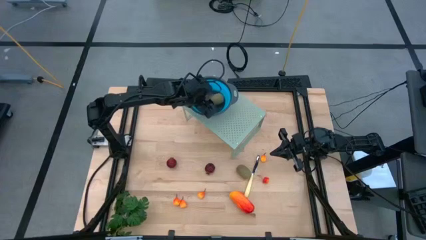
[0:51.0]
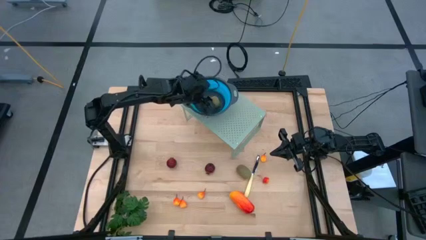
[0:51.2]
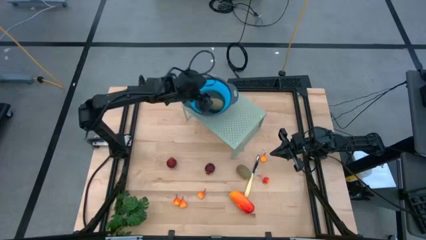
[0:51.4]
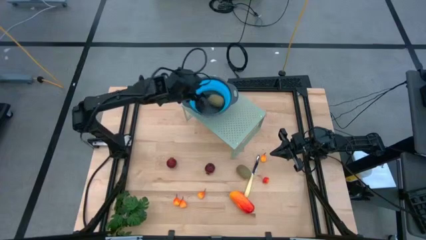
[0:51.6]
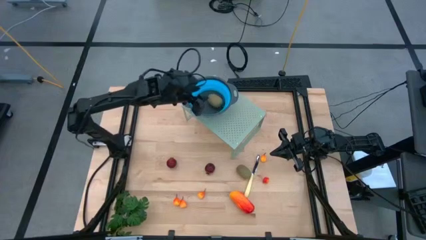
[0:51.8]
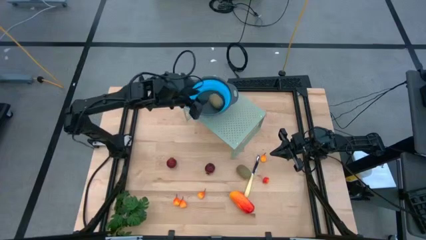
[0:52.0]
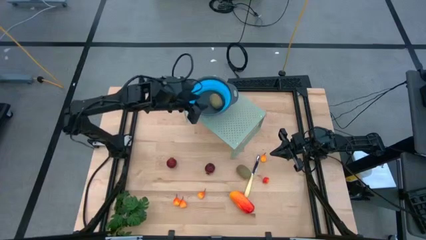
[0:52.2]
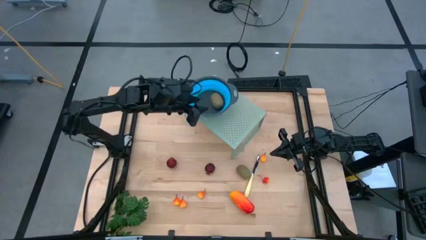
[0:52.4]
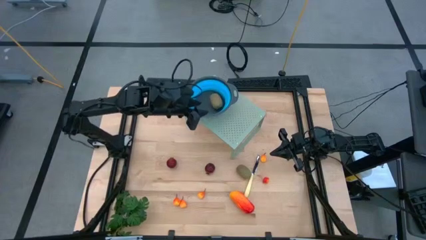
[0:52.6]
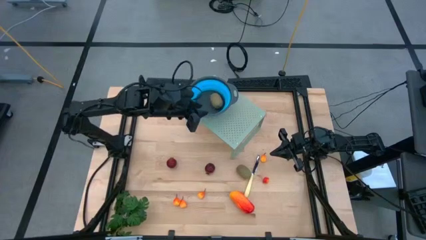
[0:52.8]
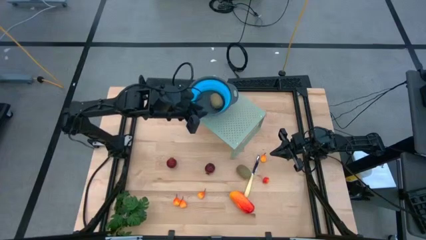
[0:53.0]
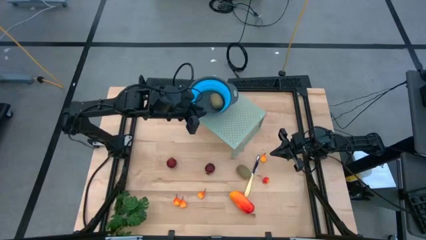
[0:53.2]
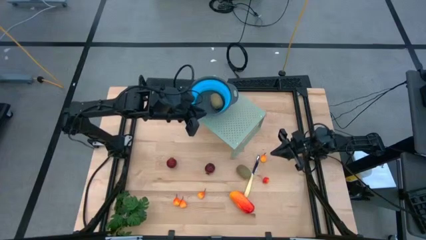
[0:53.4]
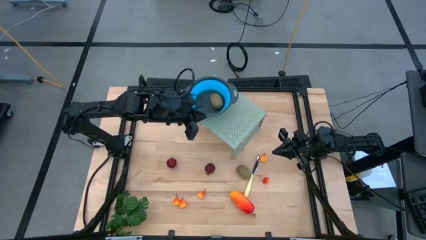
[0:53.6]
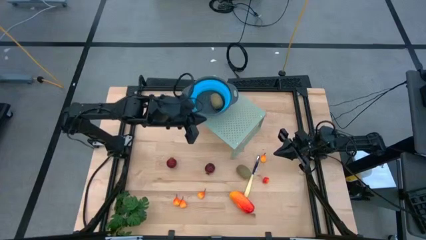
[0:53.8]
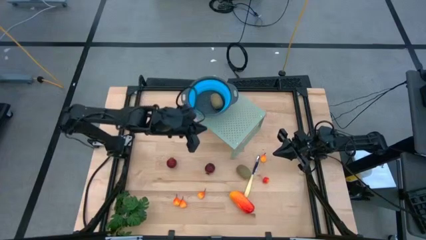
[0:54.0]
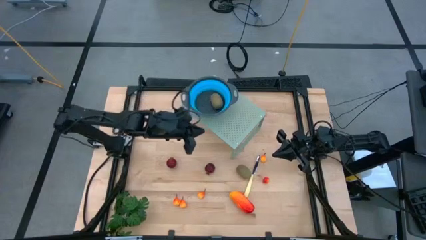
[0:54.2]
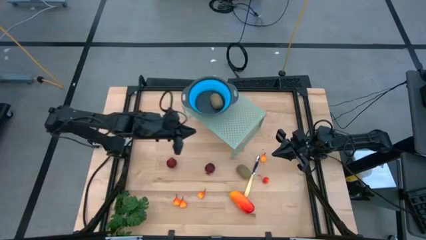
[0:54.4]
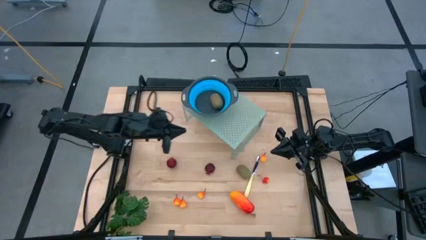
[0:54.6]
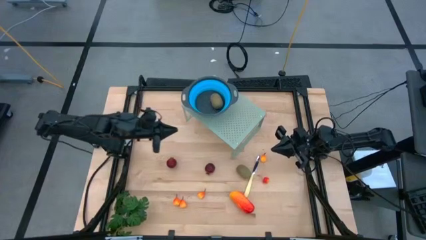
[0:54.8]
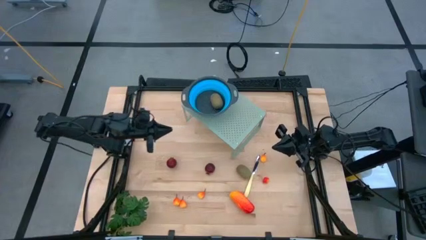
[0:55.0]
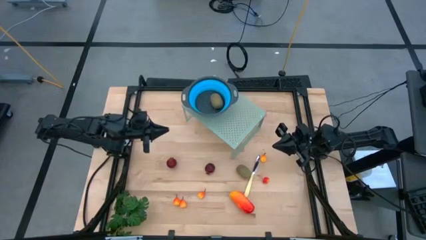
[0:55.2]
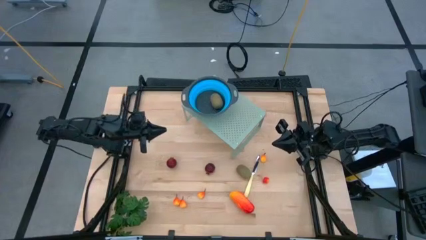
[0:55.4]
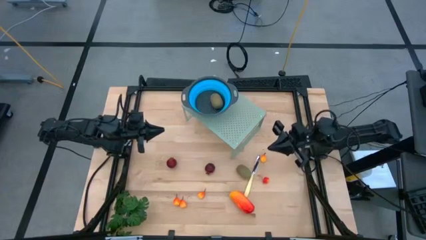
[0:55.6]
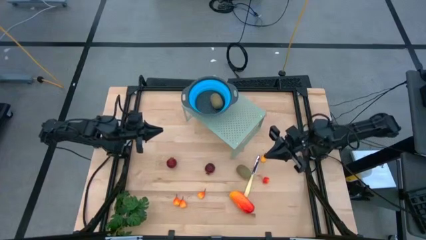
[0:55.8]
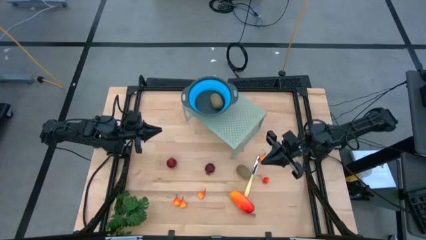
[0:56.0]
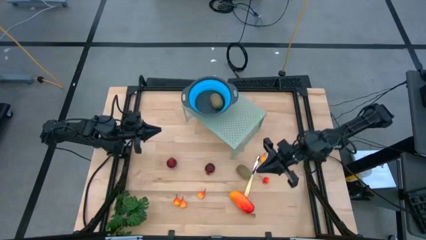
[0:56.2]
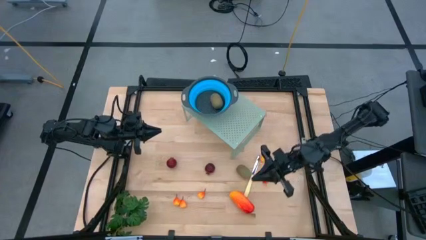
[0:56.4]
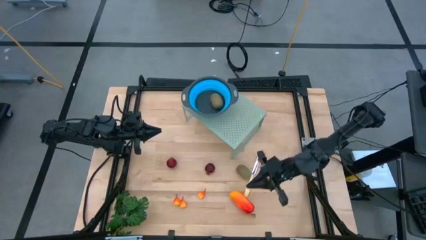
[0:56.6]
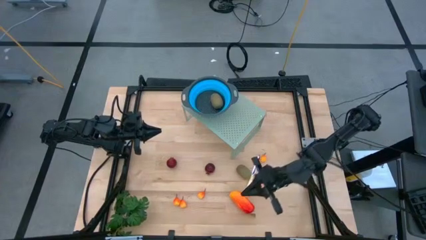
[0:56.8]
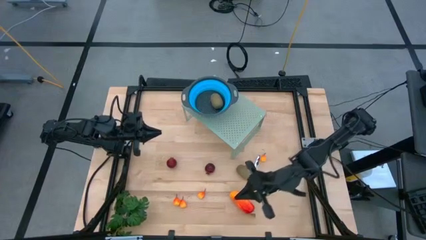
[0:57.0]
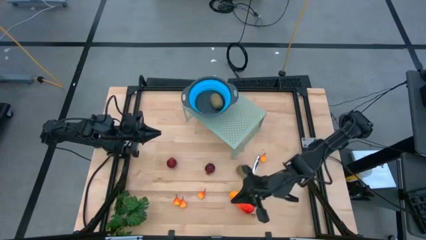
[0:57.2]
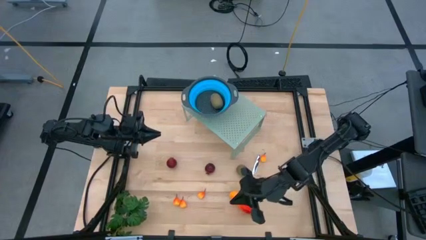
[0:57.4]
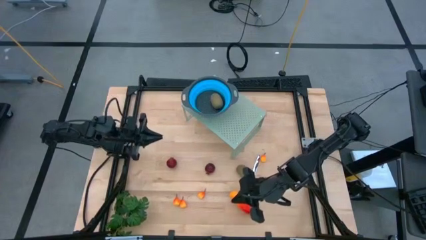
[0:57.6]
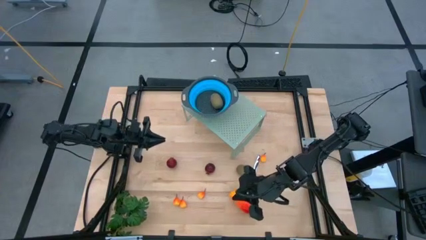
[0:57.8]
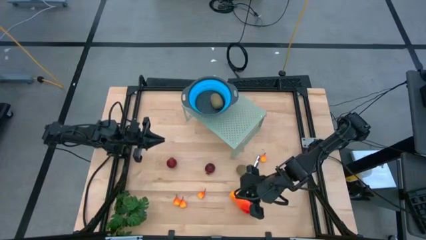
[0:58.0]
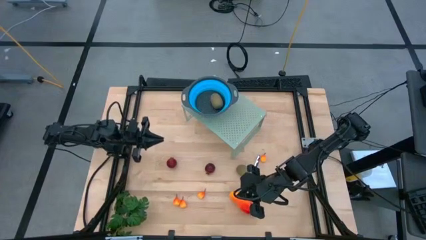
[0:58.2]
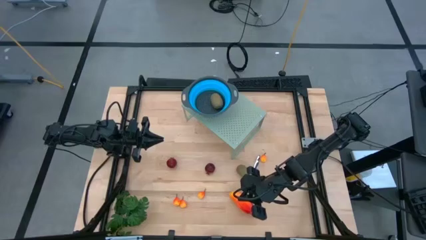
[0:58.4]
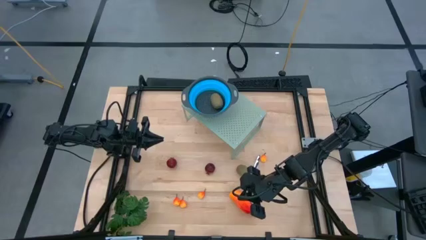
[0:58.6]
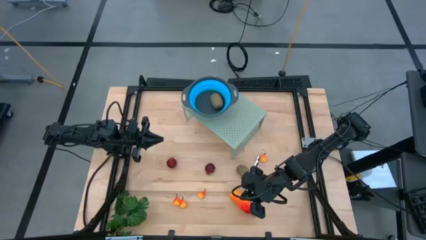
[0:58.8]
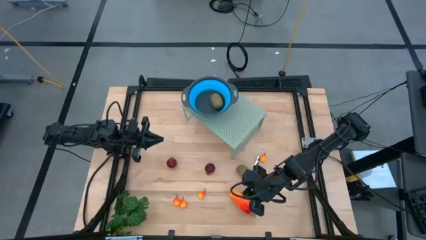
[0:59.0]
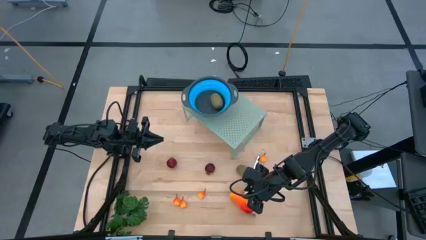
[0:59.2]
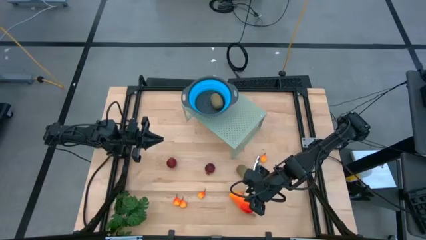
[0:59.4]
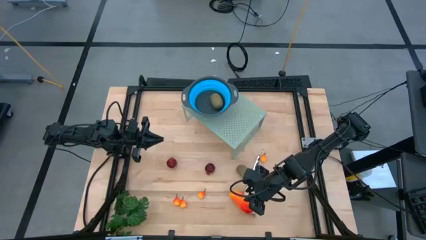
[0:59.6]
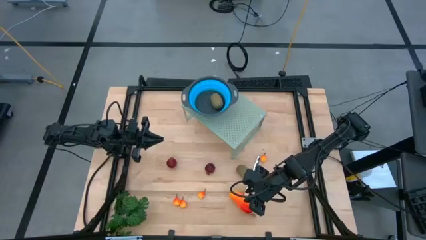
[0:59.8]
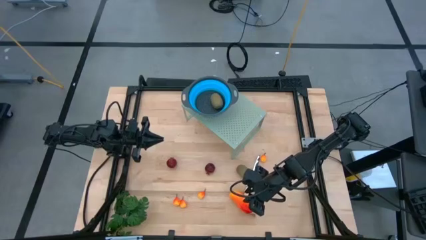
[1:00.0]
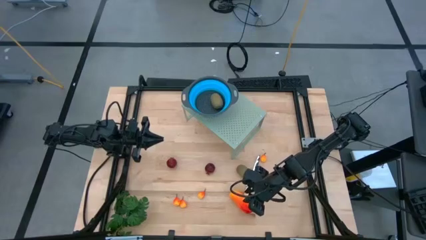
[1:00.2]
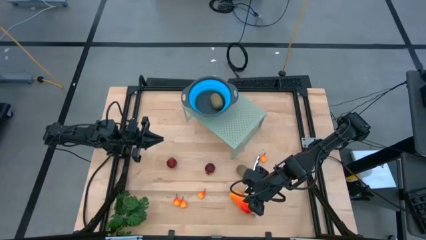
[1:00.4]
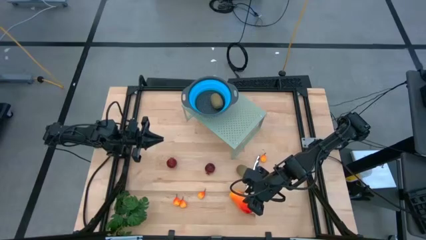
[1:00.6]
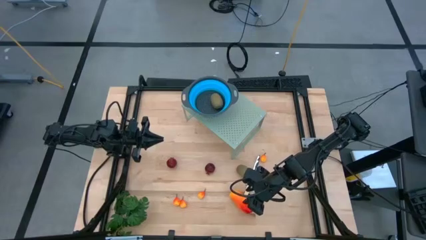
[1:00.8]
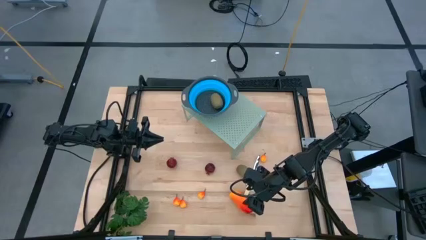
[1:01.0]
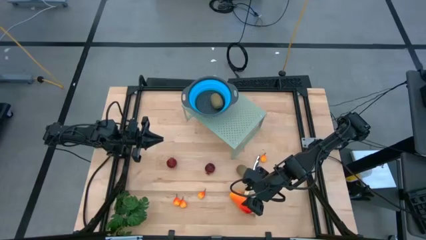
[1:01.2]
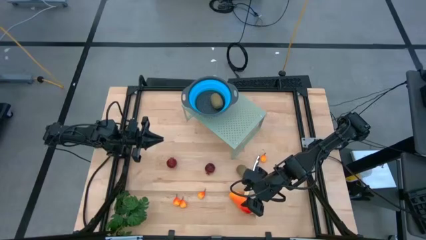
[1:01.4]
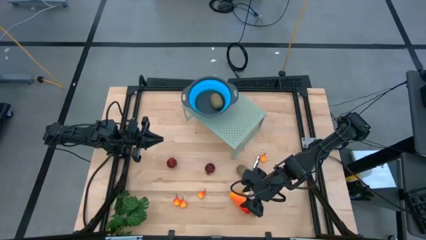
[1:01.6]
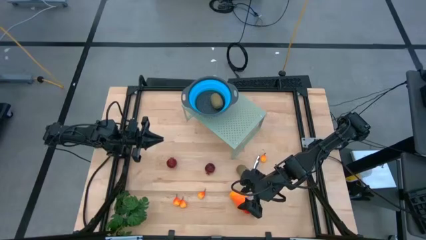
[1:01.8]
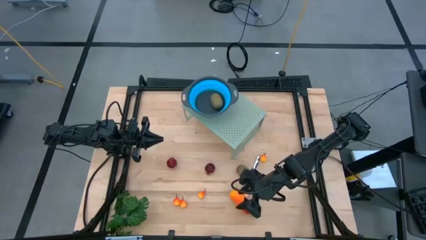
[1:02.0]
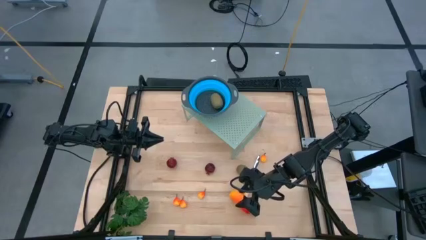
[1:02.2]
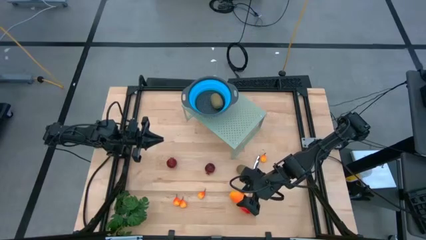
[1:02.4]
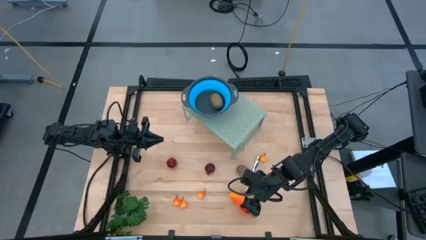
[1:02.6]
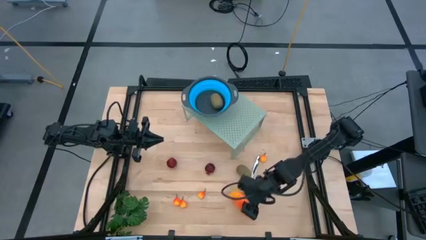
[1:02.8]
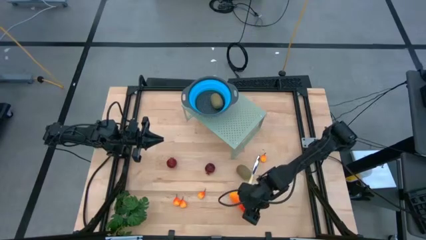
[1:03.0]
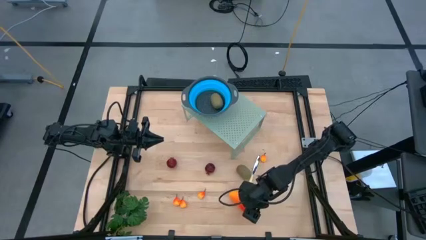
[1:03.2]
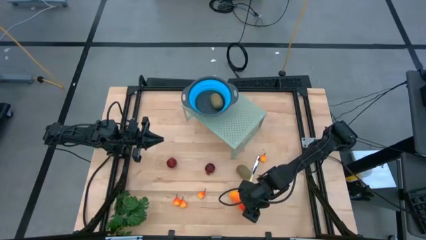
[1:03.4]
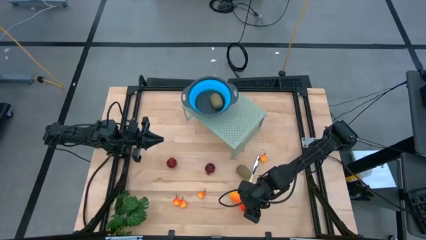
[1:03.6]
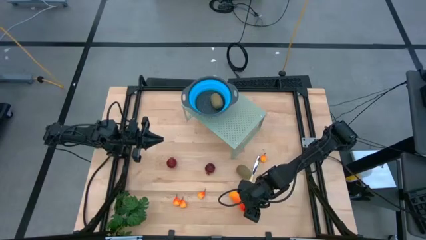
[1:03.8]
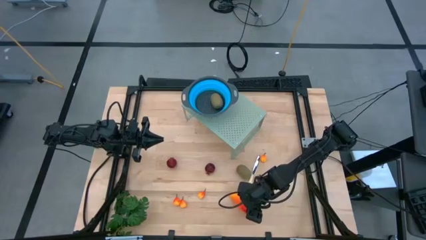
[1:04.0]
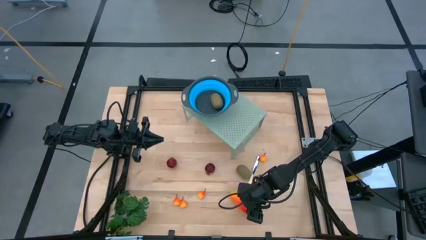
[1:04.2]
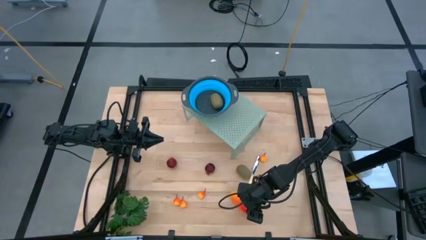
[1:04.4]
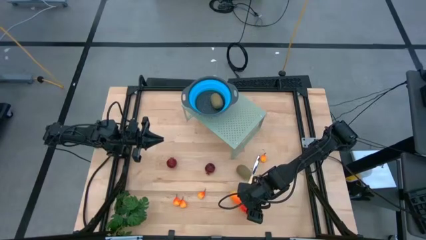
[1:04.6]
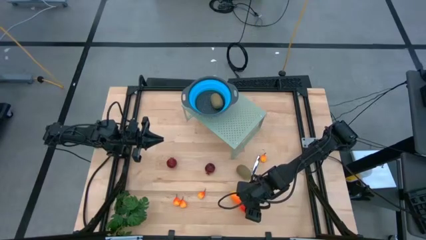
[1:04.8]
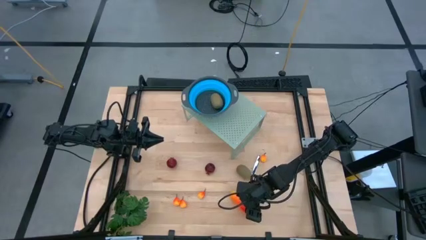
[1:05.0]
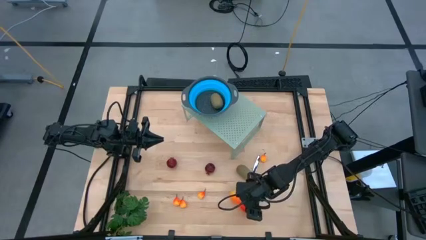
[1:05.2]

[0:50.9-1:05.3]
Task: Pick & Place Fruit
Put the mango into the blue strainer bowl on the shelf

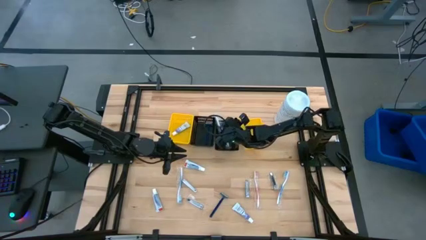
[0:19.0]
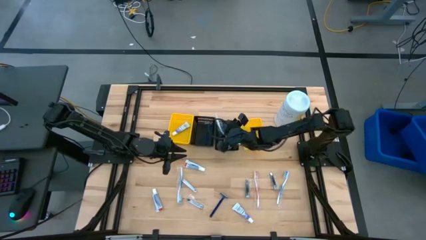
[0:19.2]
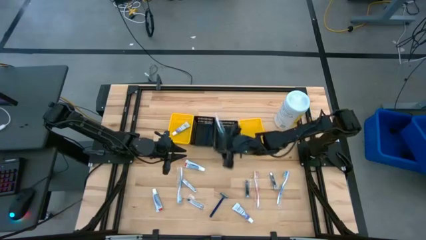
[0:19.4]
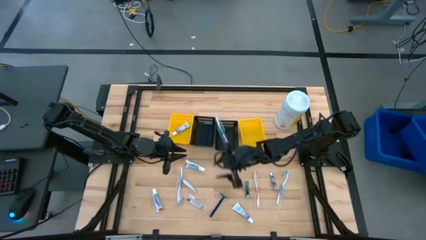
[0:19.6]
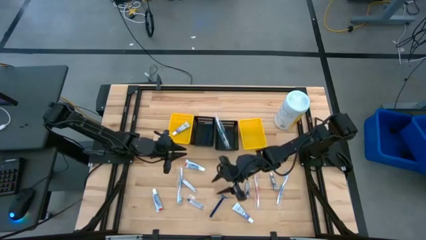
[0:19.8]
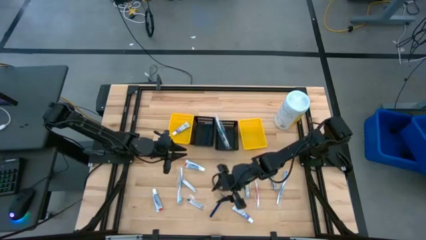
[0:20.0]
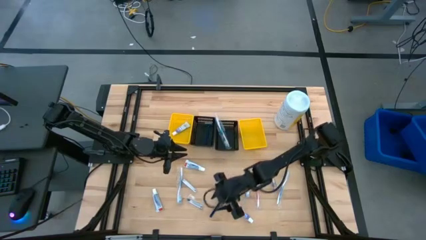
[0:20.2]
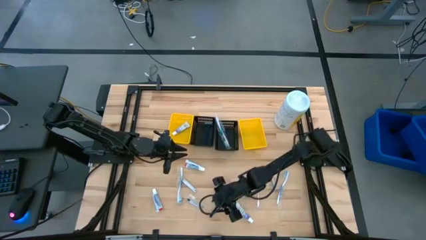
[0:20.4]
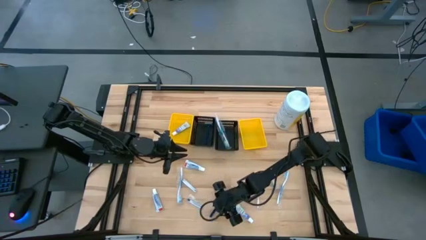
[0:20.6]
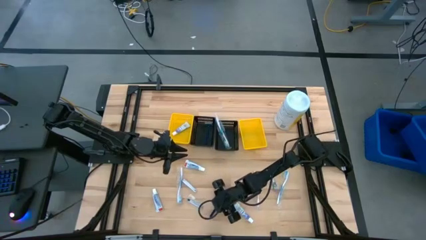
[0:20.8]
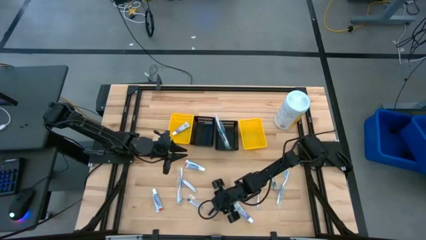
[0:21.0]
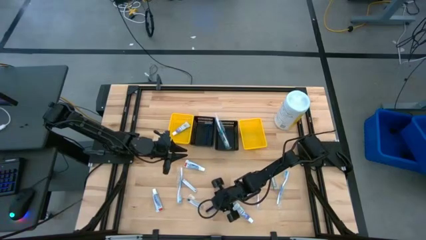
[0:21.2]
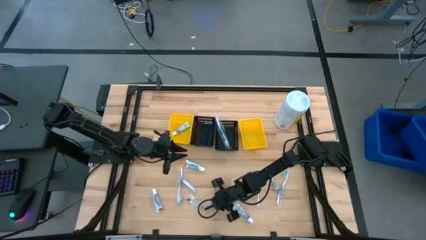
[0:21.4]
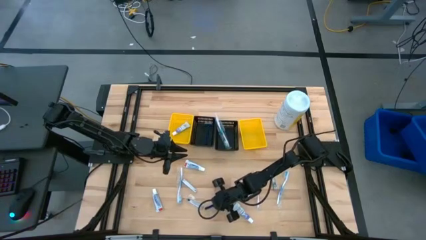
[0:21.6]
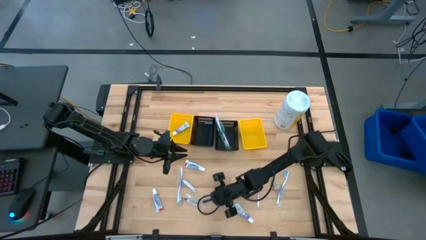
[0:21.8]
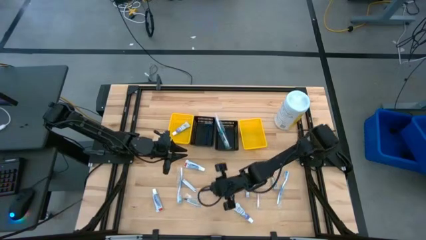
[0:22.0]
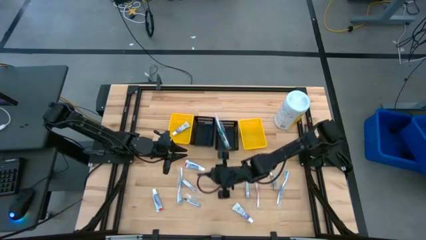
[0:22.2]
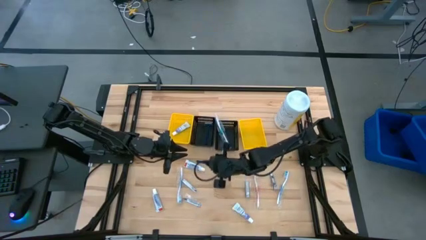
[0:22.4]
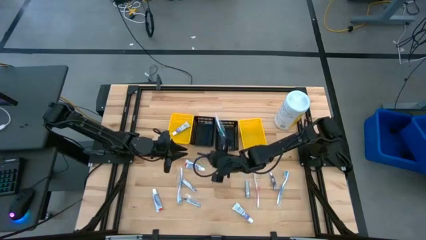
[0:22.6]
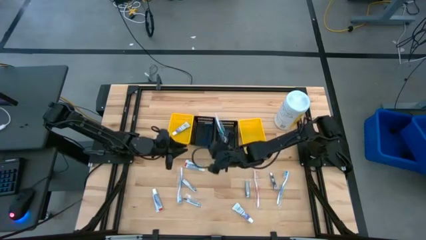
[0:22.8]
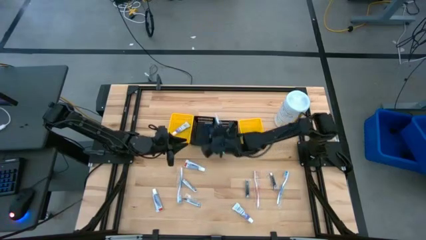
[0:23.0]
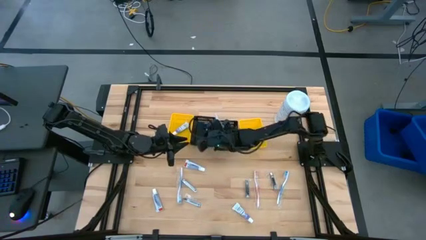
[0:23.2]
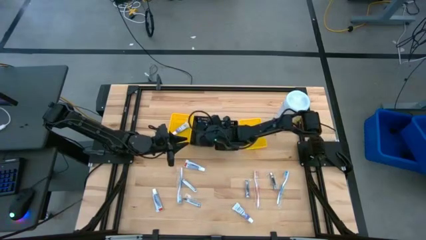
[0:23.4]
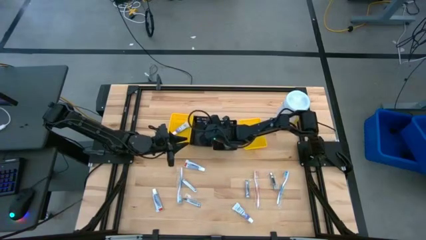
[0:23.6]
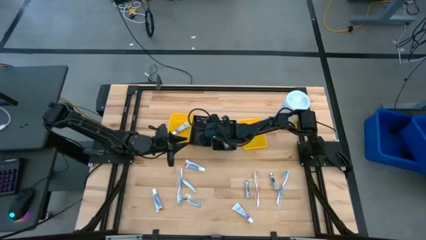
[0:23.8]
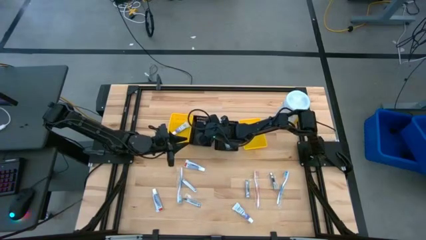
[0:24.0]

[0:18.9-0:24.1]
Task: Pick & Place Travel size toiletries
Put the blue razor into the left black bin
